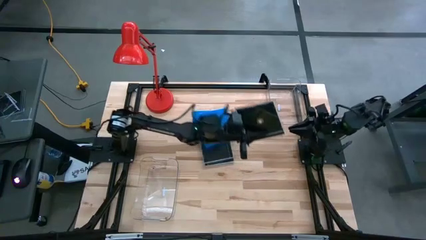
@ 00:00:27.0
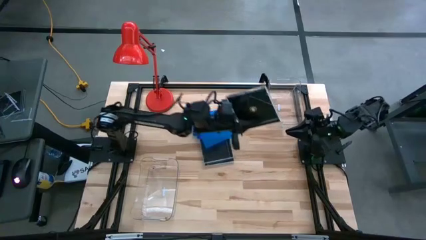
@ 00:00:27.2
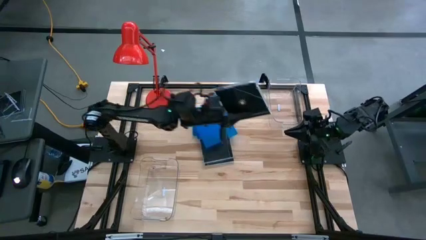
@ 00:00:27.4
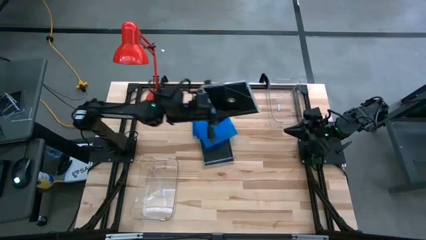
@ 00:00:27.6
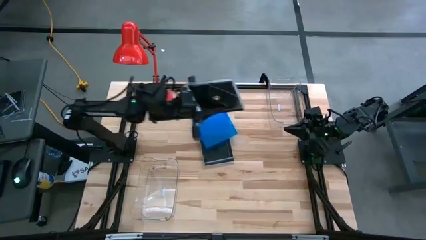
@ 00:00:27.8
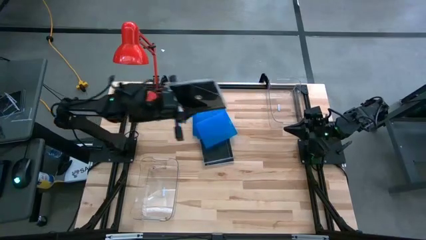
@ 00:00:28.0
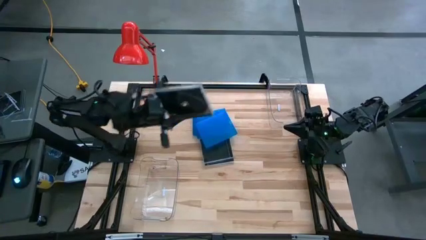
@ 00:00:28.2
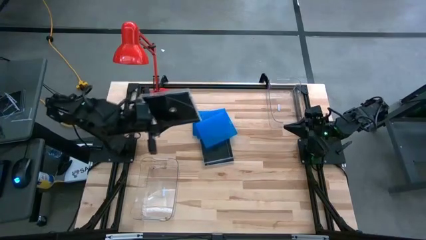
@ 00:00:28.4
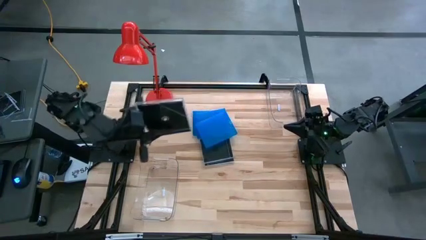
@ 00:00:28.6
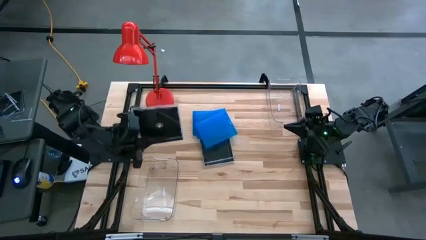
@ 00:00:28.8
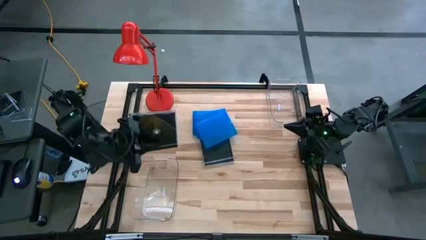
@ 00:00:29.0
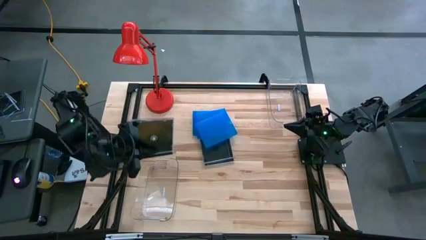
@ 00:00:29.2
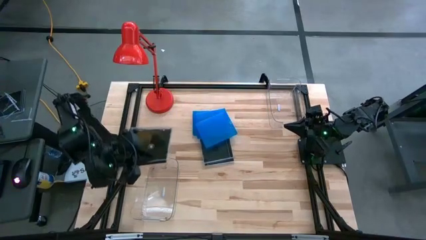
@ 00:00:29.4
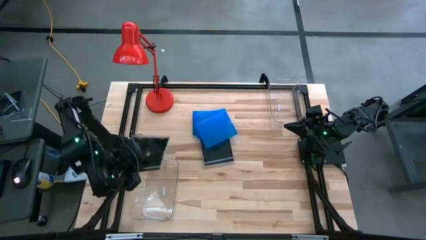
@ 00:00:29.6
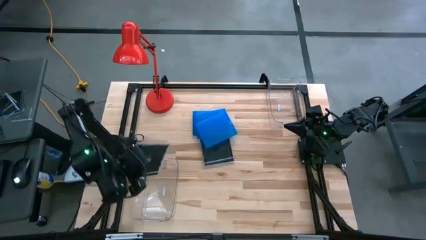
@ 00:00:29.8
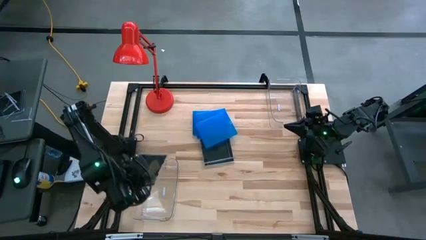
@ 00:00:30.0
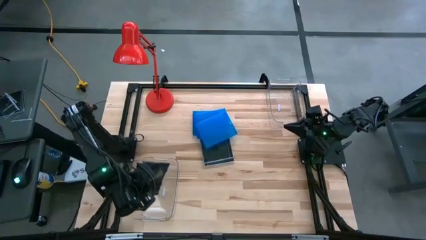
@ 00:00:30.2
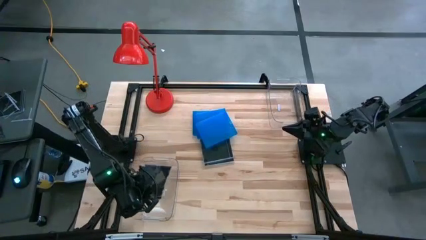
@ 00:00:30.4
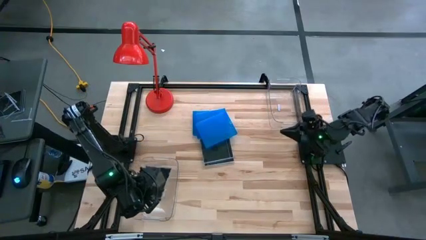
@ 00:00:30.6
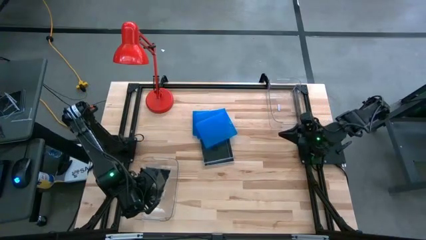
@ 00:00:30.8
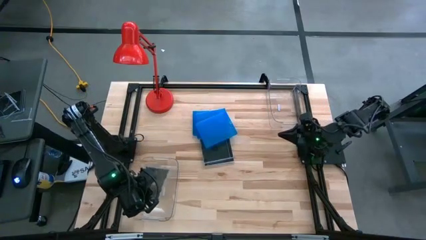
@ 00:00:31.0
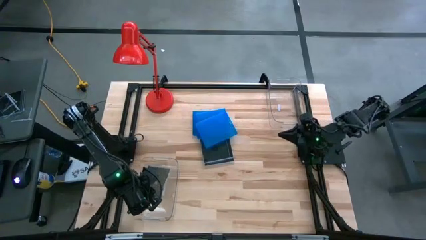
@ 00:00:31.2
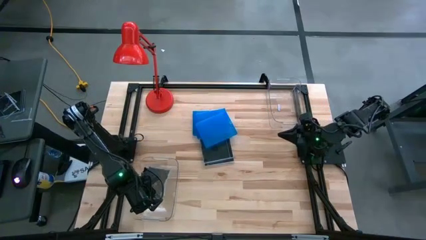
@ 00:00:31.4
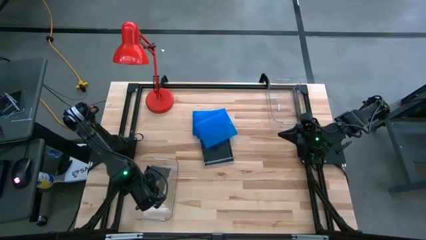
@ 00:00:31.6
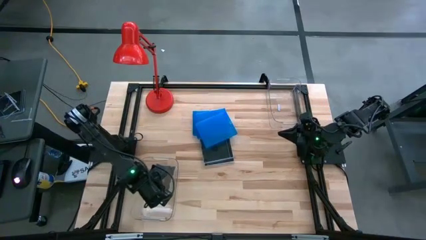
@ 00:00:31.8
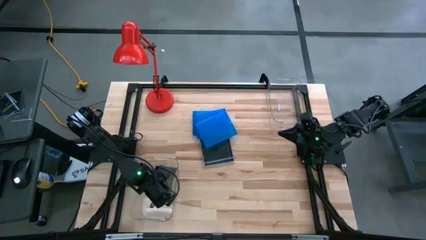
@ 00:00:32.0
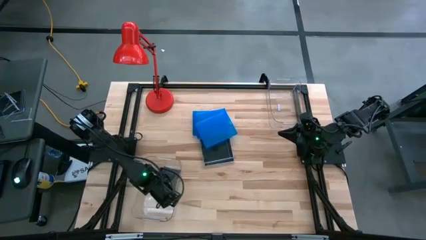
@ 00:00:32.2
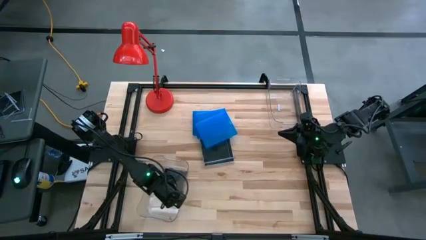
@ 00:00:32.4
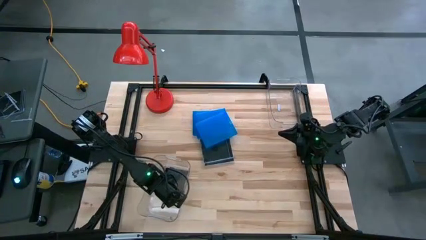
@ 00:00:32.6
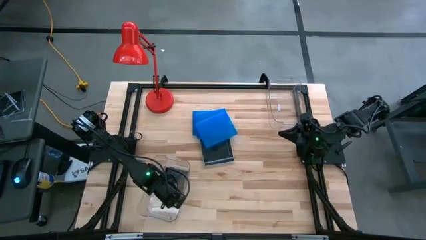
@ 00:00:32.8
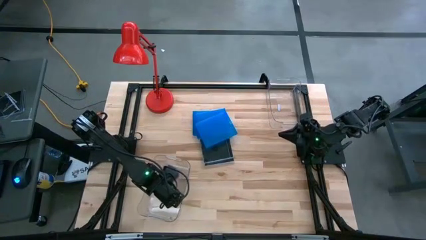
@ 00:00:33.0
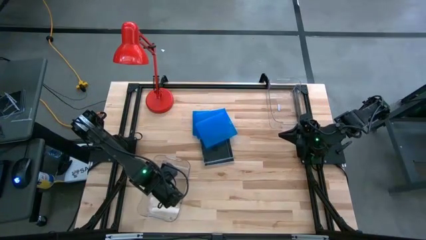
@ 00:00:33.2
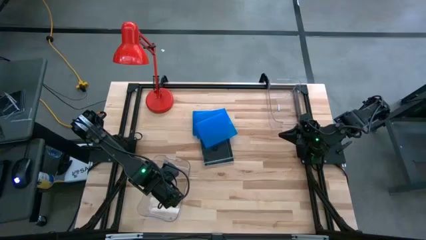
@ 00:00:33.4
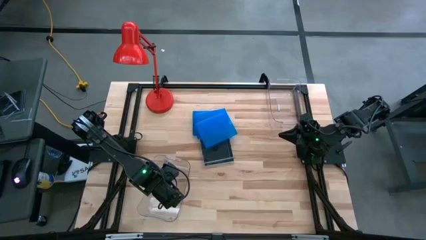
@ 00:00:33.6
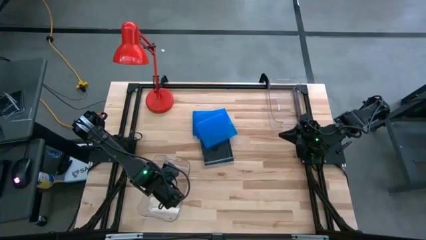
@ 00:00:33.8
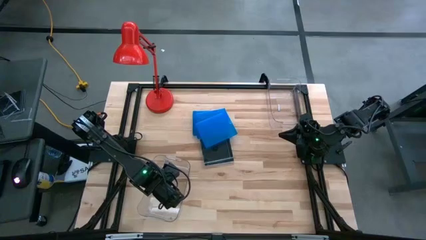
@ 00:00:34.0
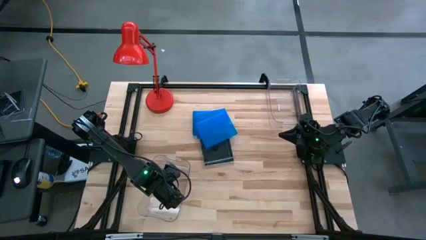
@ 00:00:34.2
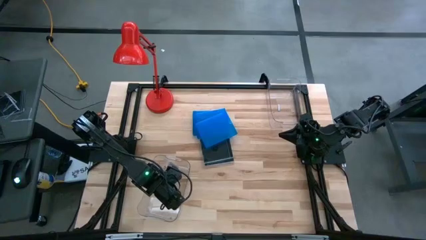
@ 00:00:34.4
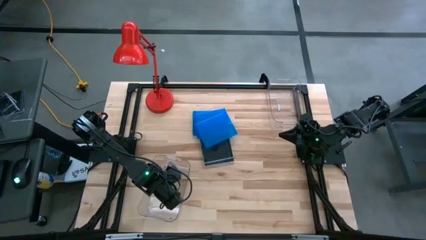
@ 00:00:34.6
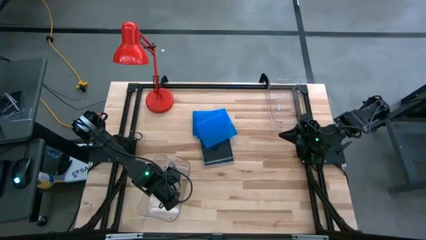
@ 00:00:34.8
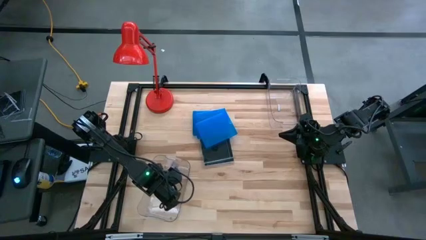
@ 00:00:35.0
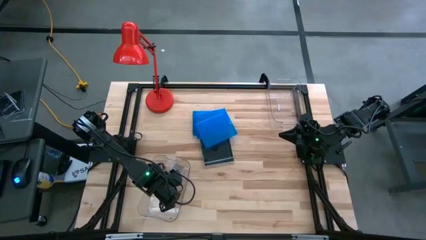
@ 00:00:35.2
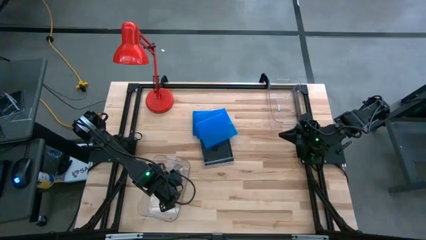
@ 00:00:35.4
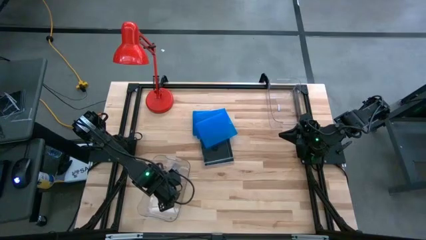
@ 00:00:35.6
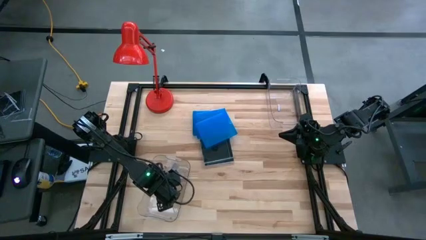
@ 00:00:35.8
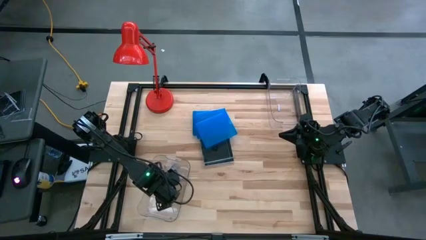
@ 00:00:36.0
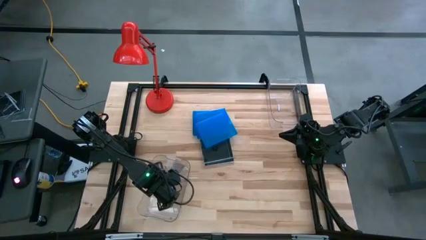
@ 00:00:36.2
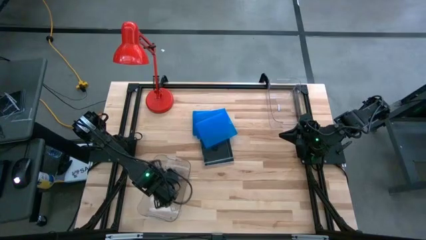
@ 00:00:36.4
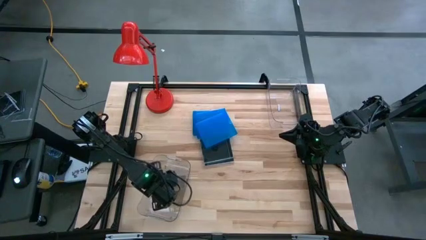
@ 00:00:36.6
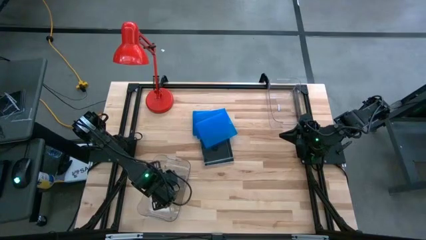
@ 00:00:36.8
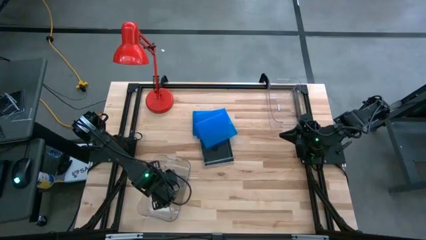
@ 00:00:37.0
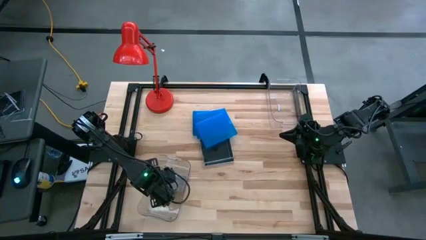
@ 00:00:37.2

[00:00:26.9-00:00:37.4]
Task: Pick & place jewel cases by type
Put the black cd case into the bottom transparent bin
